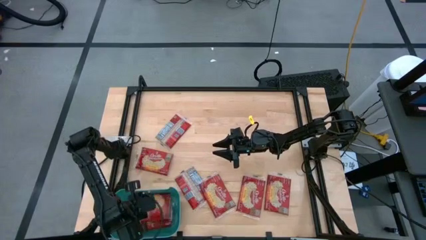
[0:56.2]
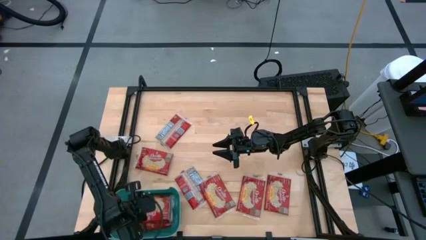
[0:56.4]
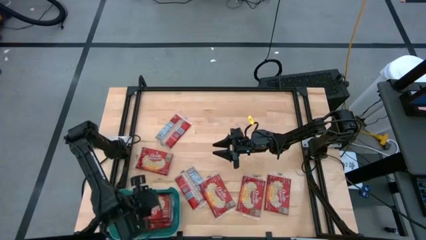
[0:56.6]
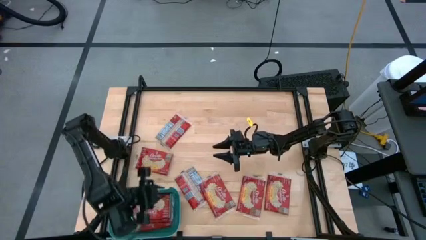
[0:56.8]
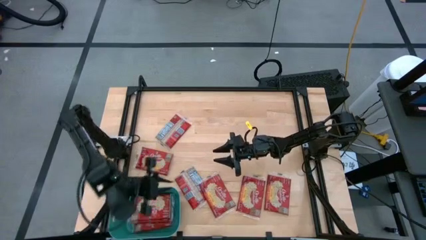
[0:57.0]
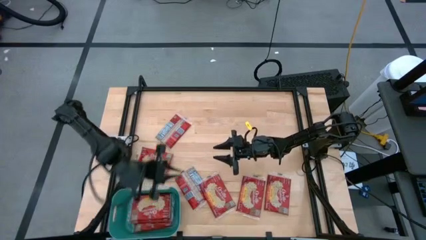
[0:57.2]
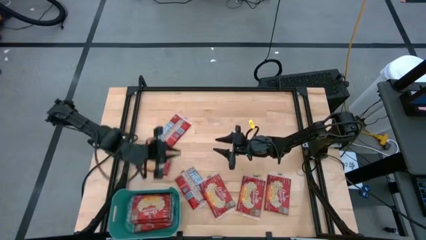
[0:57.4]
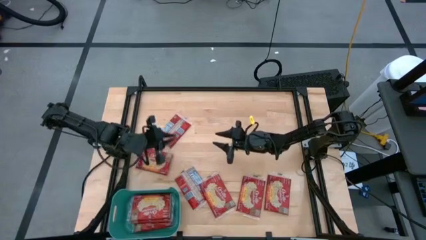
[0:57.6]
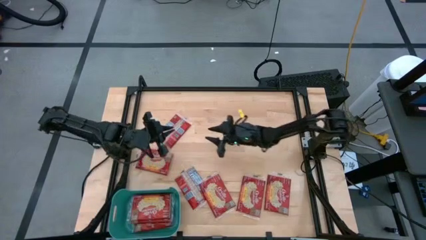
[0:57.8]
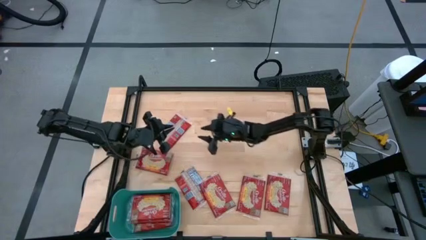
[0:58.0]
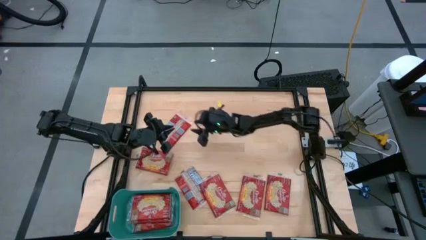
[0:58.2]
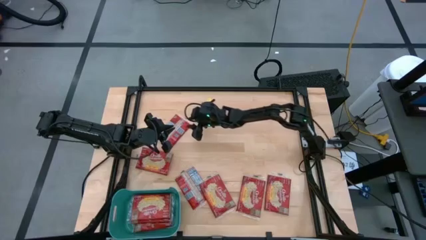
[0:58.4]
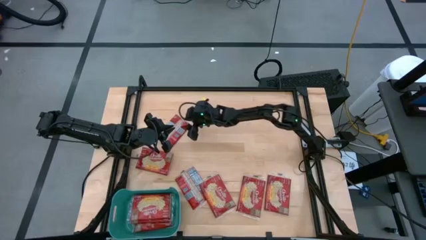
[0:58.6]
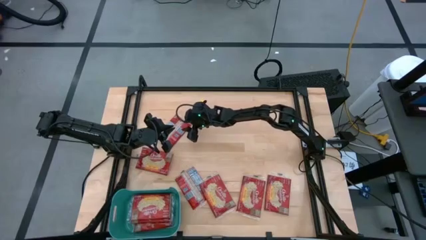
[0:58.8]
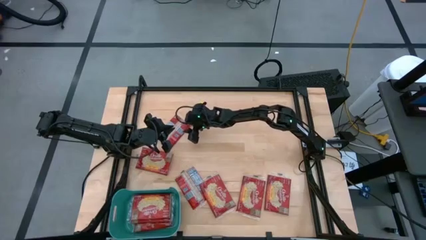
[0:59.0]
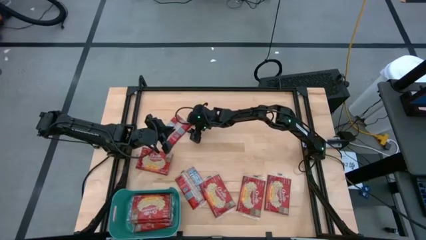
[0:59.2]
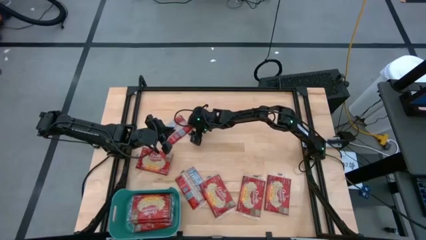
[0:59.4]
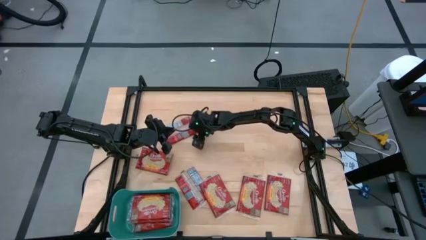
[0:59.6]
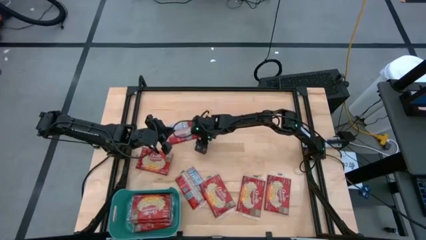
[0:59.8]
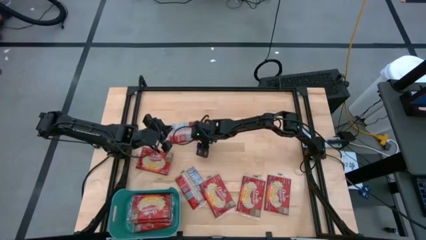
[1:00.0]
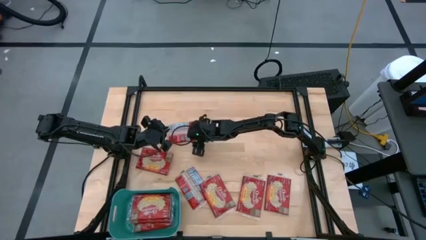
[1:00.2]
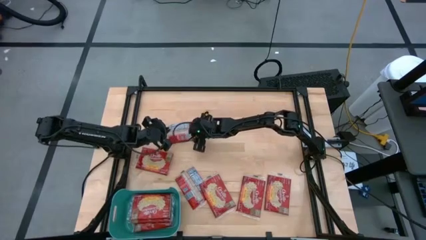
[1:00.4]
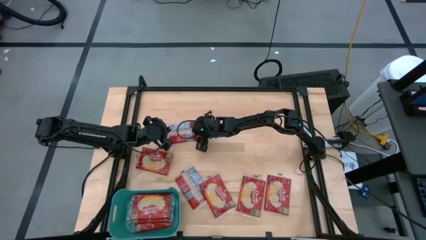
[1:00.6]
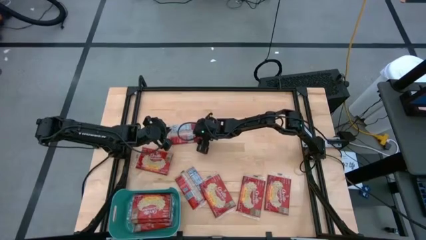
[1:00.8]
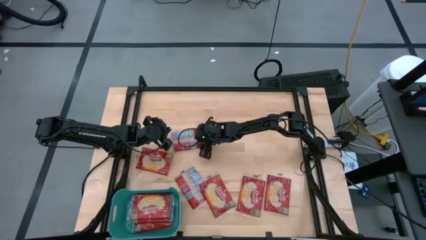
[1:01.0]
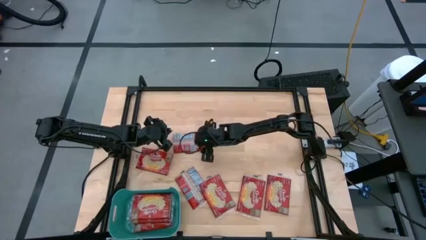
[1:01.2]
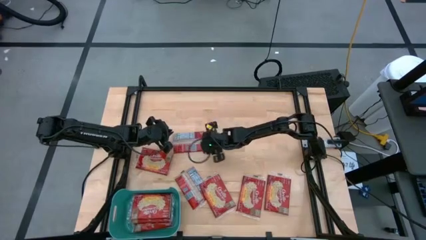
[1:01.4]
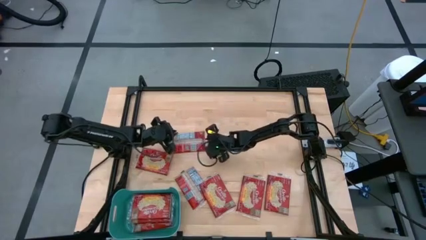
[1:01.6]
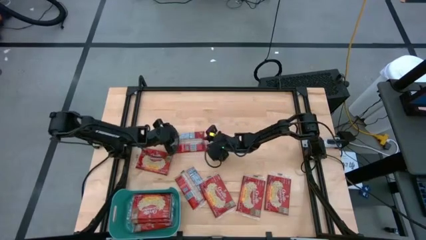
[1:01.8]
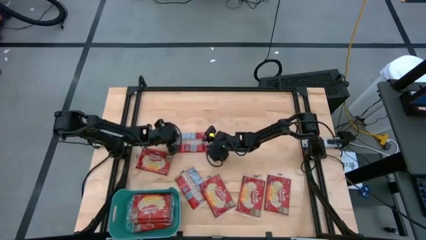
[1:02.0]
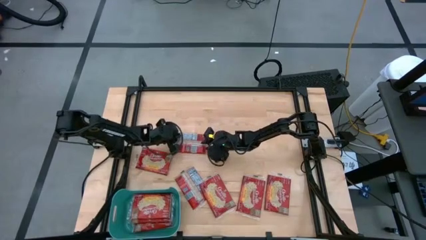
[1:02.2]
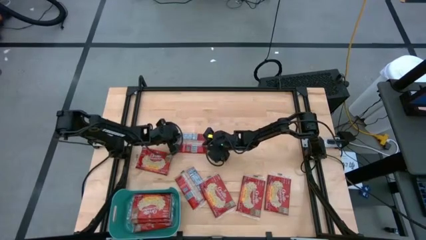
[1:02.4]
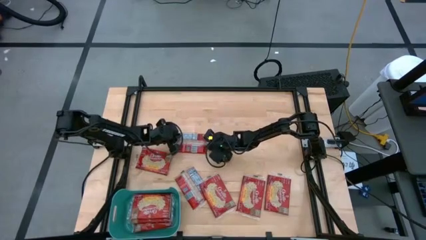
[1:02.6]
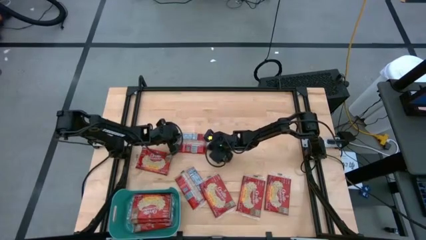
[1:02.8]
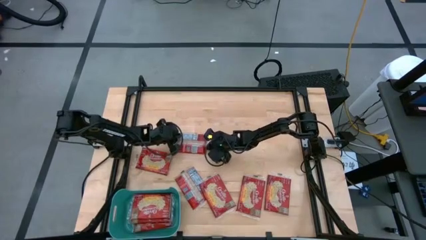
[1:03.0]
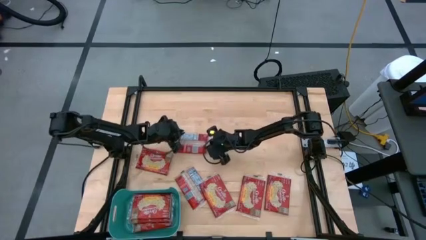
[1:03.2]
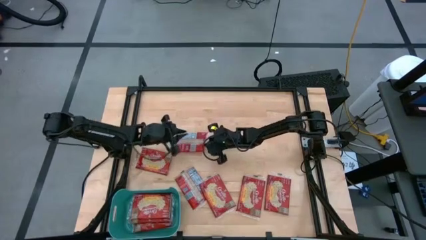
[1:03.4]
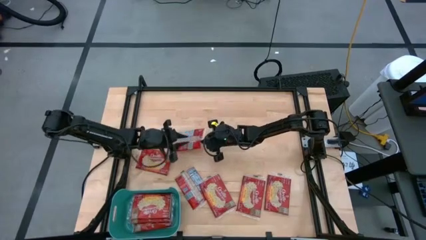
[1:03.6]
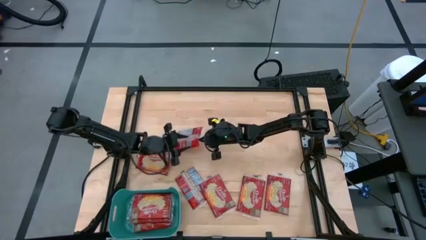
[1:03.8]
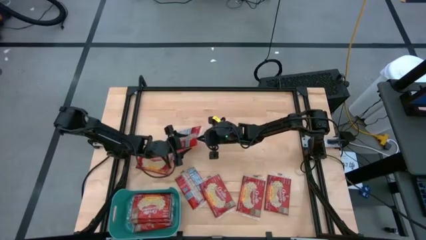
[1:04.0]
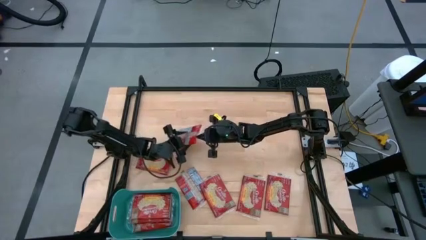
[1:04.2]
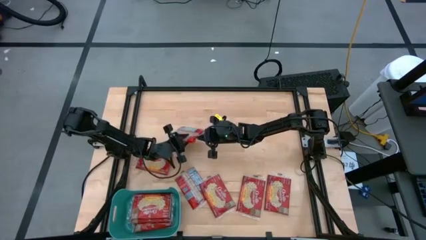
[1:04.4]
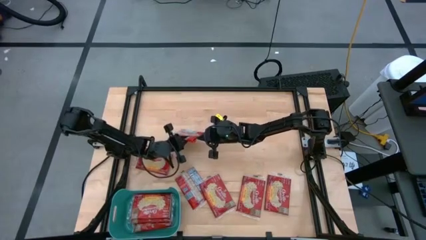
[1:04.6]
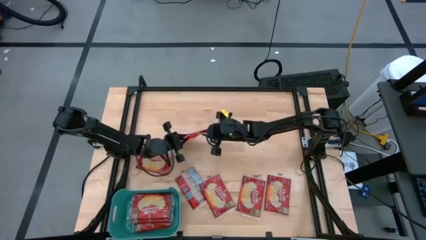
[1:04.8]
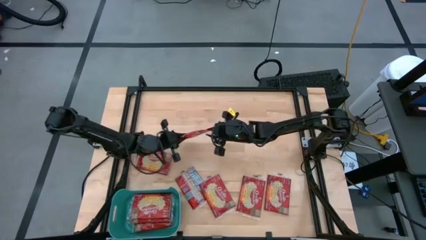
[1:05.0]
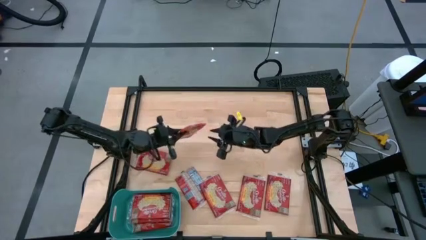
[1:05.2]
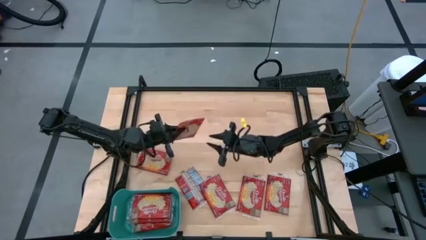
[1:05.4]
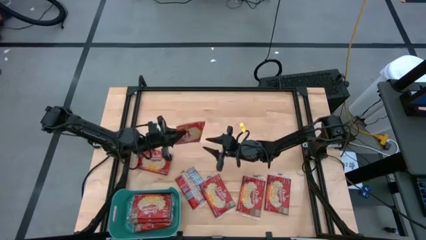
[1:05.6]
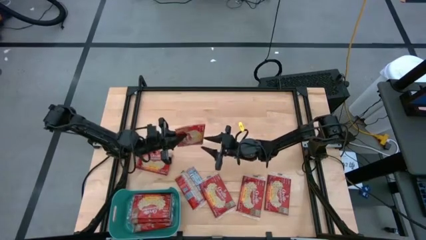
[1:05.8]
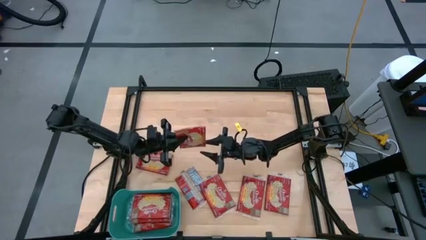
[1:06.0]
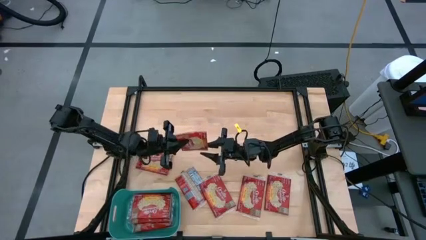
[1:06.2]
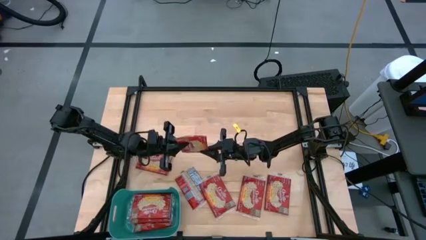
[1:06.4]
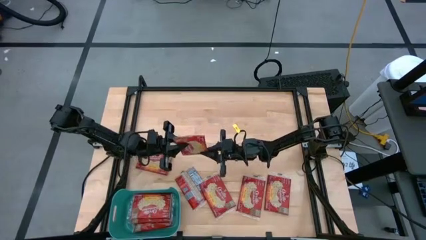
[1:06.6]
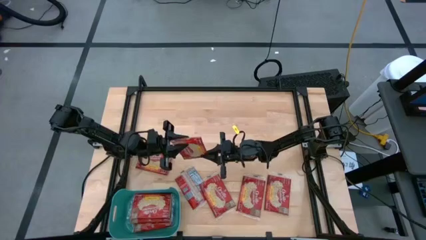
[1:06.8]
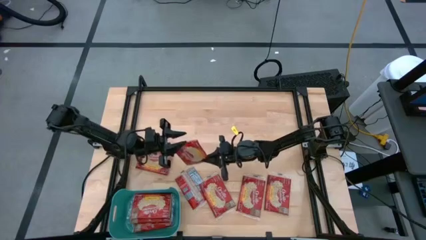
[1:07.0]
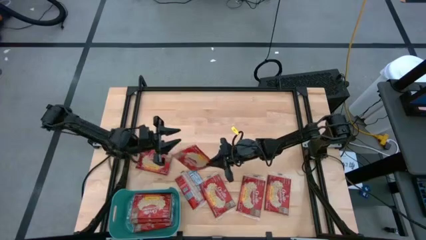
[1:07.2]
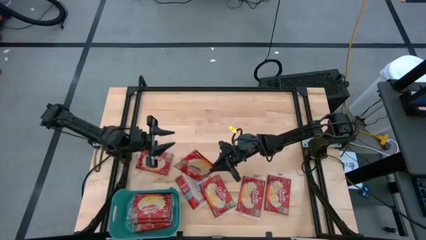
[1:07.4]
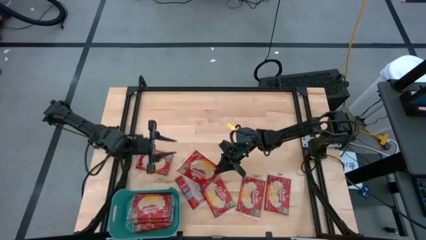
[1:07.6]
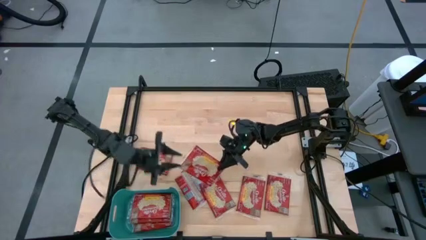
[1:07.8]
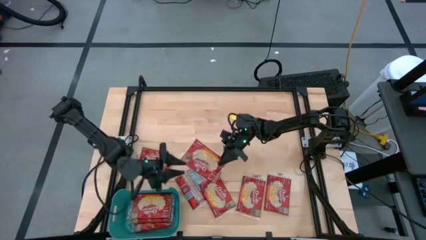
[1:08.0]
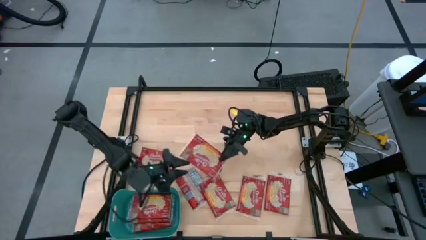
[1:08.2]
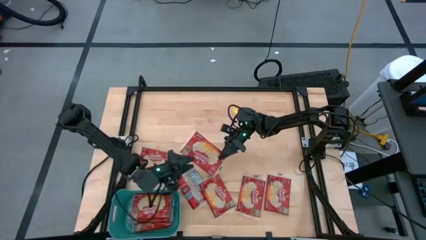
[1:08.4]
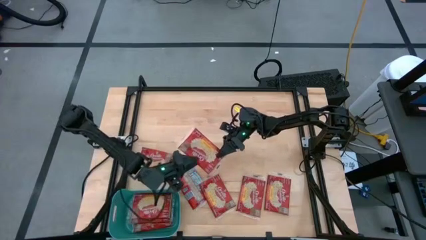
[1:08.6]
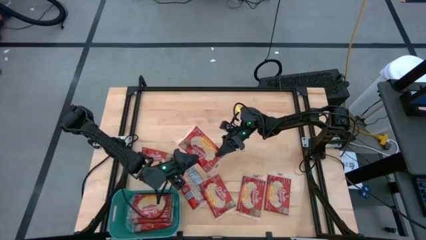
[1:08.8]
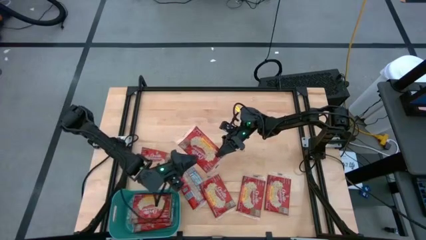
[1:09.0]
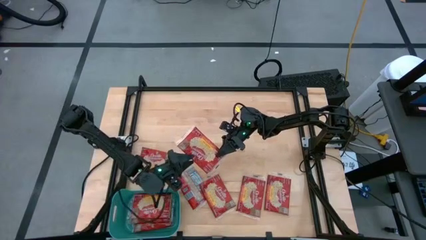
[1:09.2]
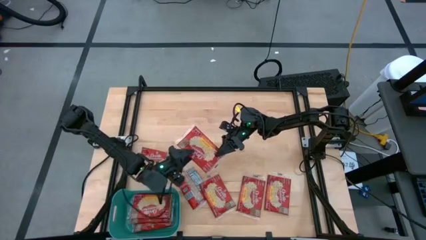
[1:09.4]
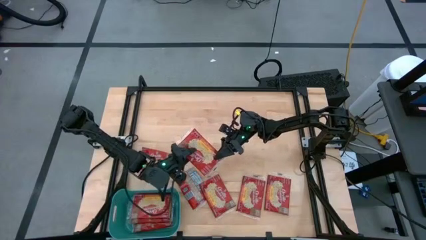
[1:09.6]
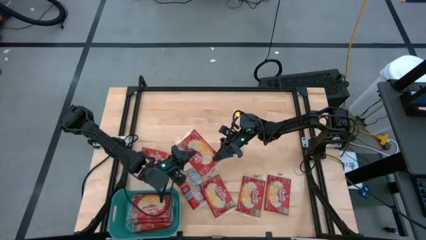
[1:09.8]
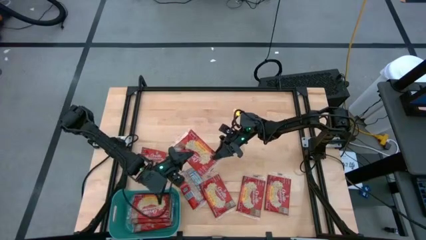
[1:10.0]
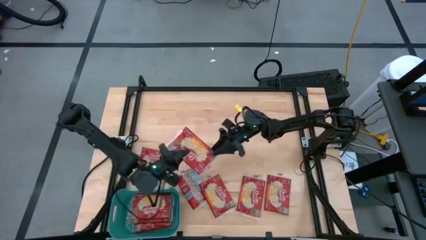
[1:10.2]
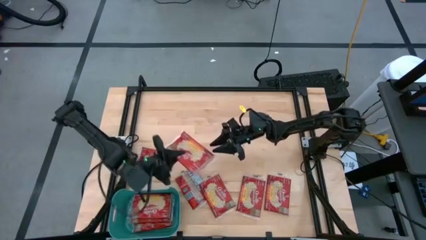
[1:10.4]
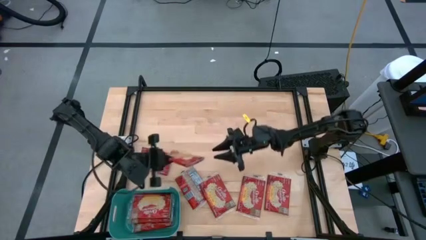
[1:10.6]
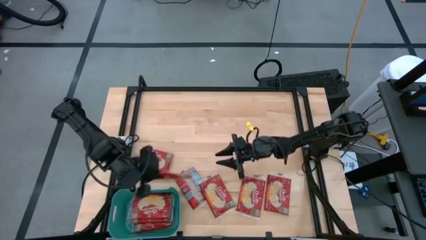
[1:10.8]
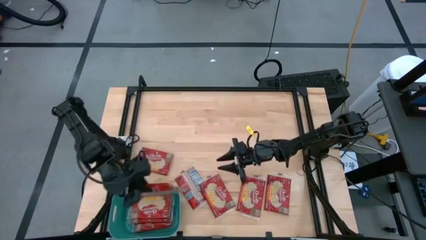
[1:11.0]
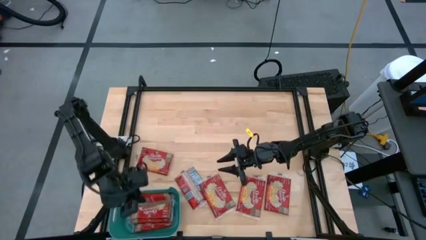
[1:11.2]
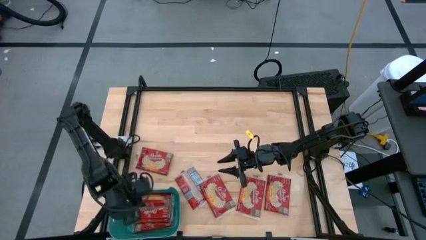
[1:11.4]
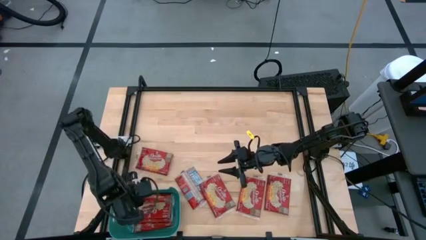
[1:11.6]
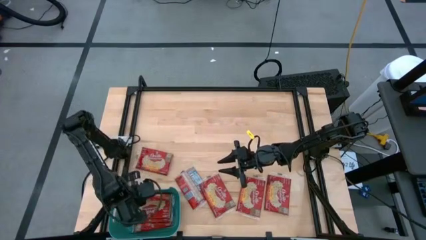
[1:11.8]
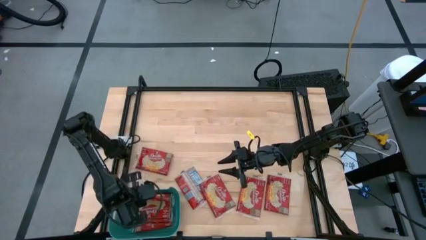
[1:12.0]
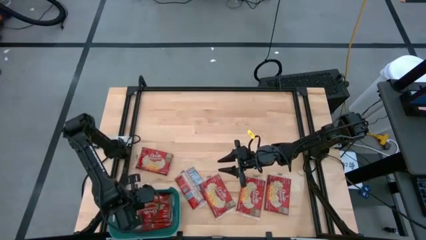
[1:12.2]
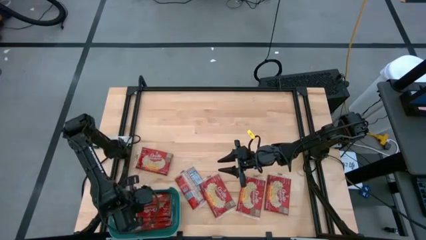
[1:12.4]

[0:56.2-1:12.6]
Task: Sort popcorn bags into baskets
Put the red popcorn bag into the blue container
